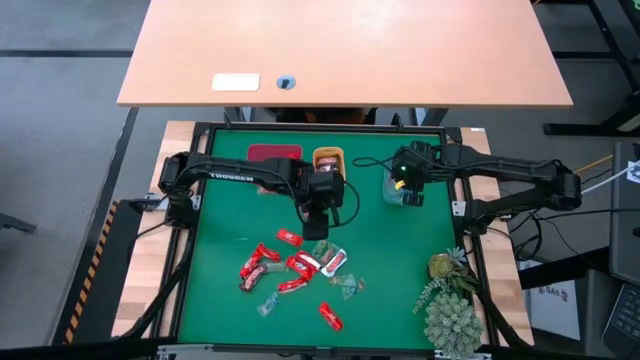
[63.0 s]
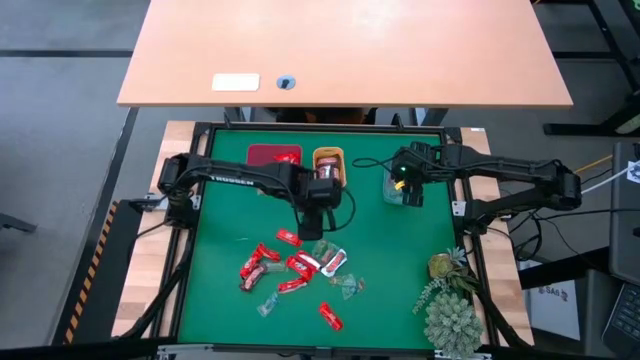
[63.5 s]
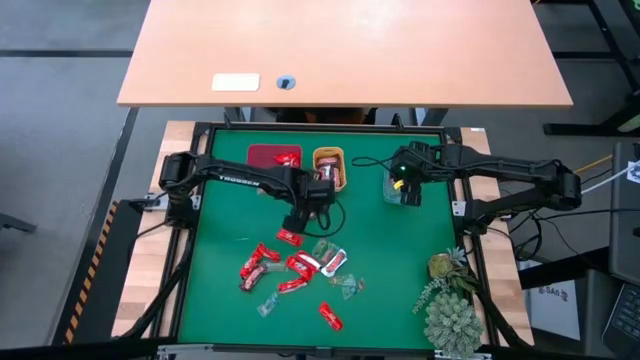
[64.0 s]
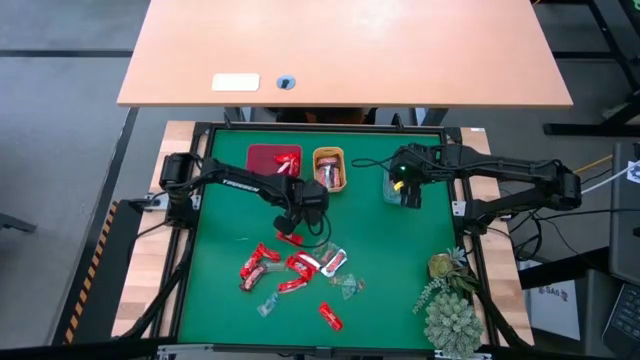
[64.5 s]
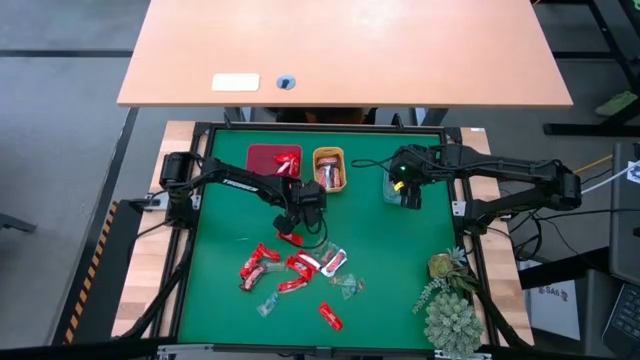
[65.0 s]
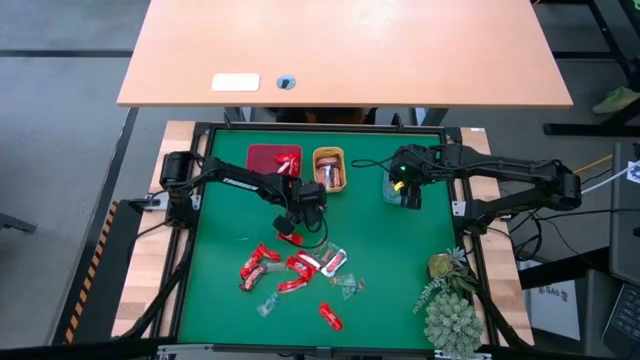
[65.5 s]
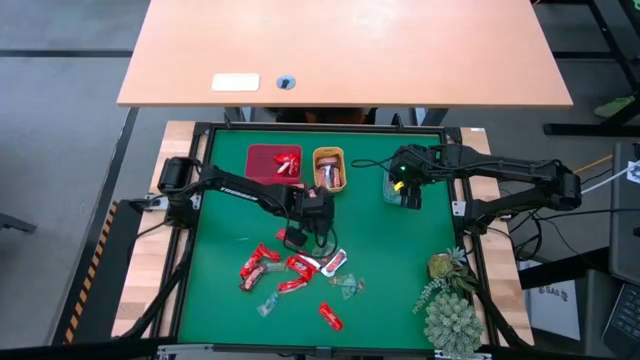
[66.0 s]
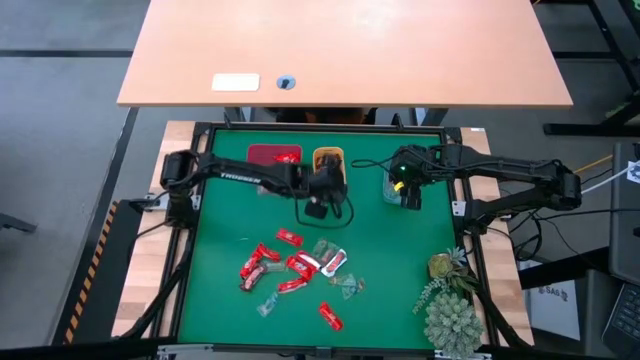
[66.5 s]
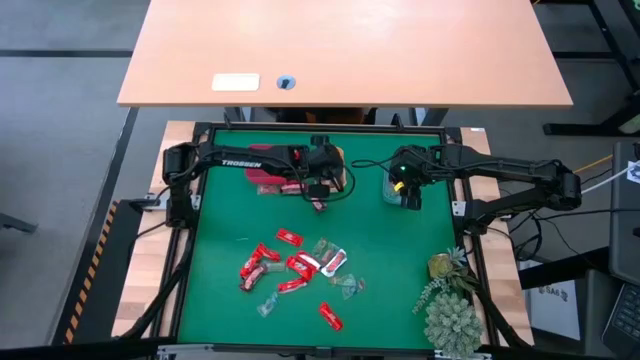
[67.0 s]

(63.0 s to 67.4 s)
Task: Sort candy
Put the brown chocolate bar into the yellow bin

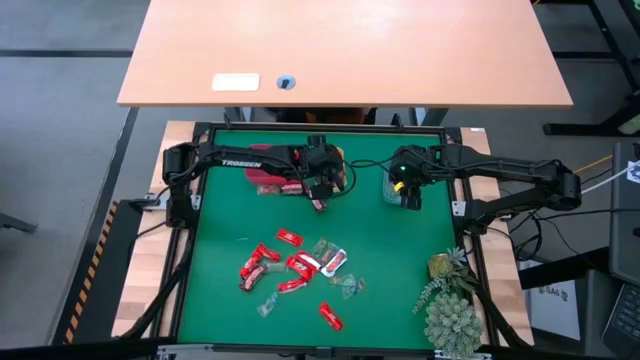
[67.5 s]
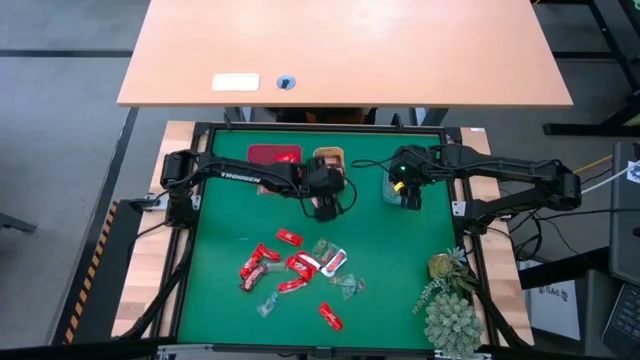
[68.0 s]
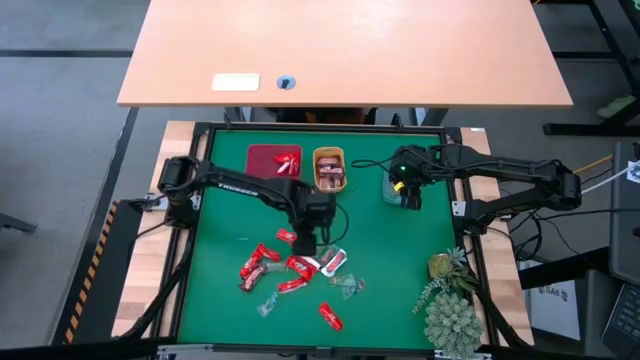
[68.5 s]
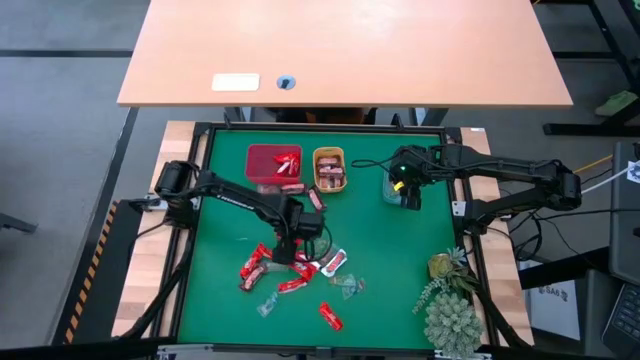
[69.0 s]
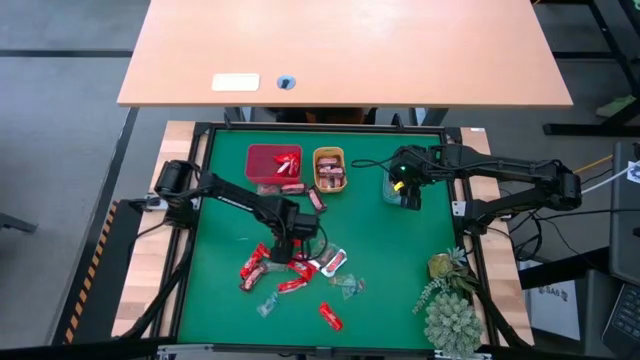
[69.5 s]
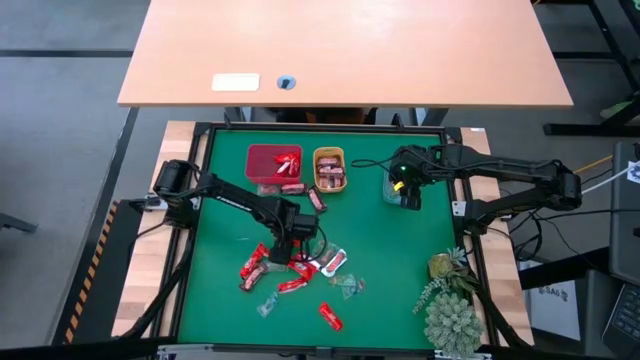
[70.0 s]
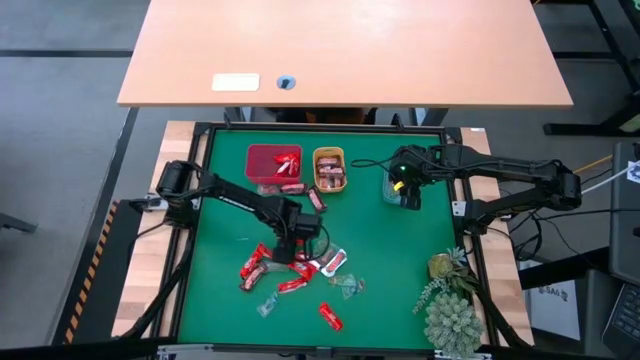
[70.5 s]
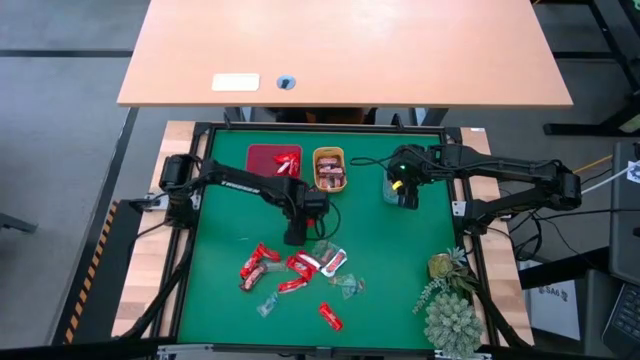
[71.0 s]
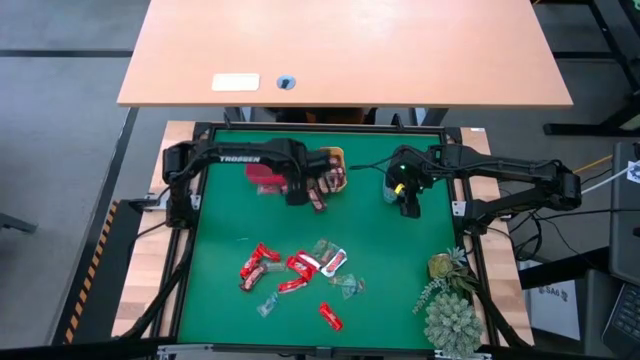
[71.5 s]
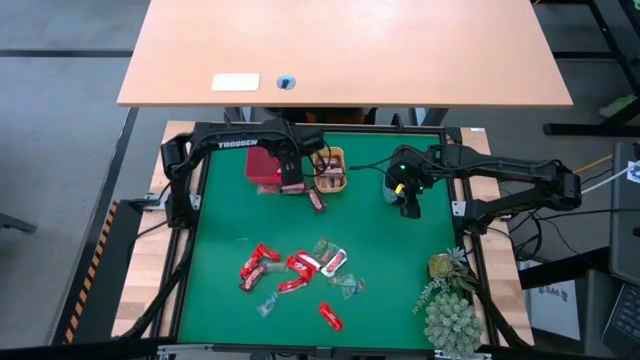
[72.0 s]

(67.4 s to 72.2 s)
Put the red chocolate bar into the red bin

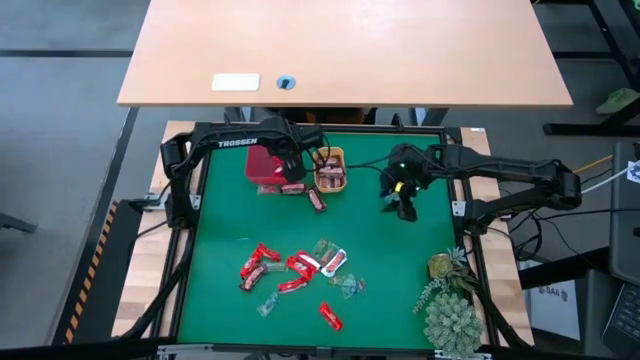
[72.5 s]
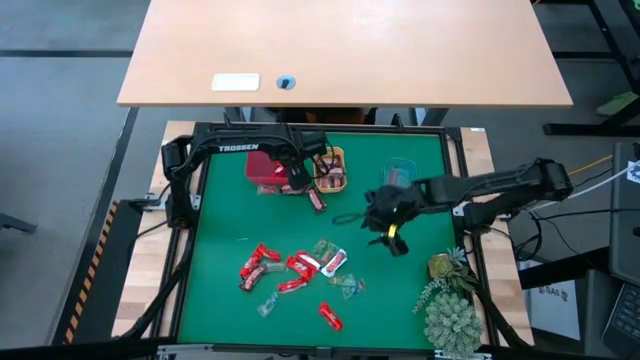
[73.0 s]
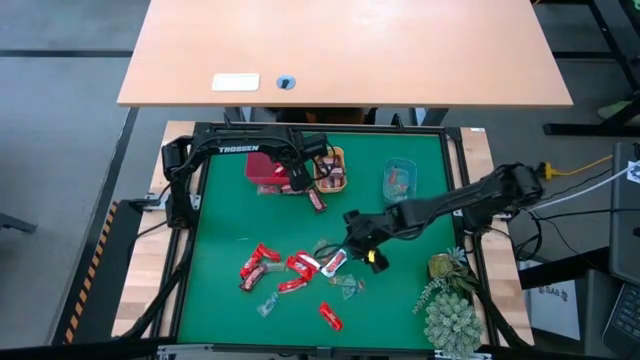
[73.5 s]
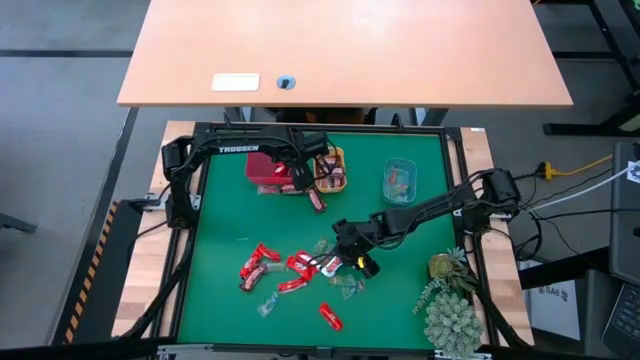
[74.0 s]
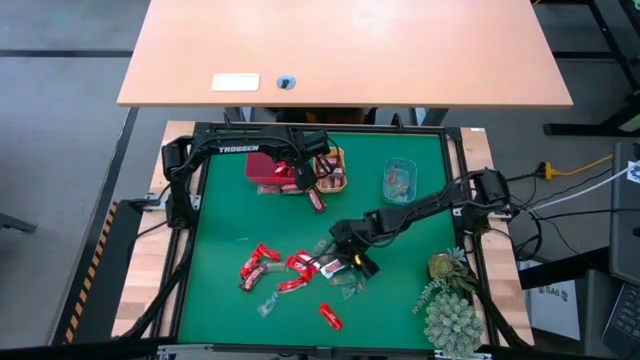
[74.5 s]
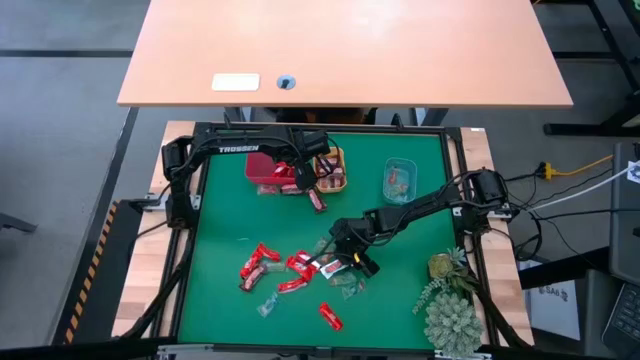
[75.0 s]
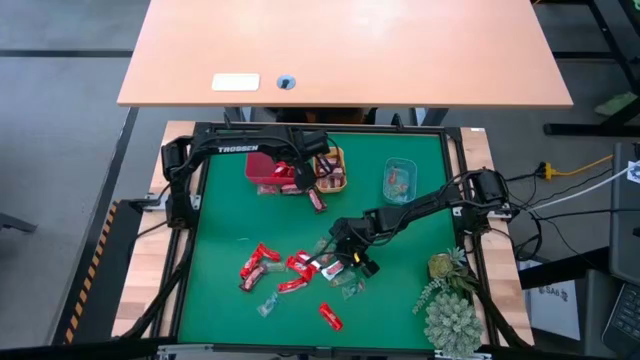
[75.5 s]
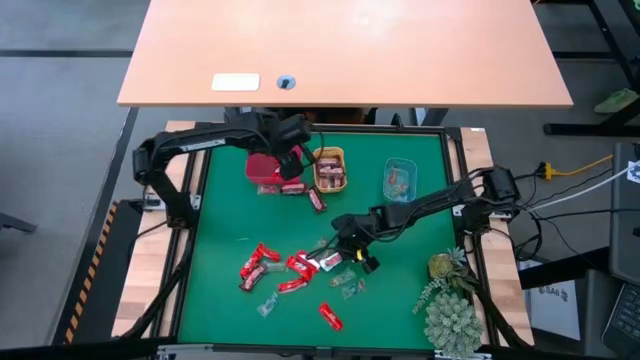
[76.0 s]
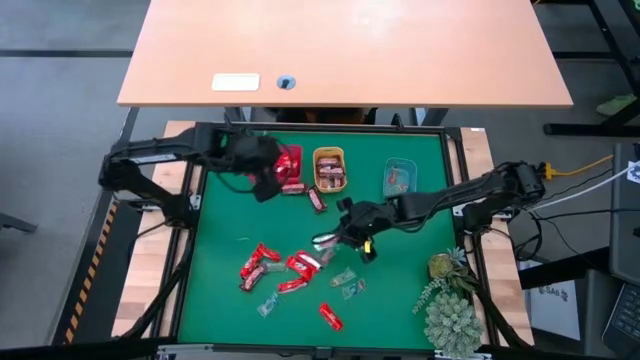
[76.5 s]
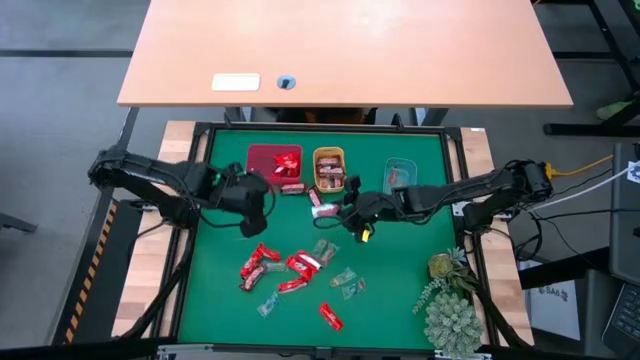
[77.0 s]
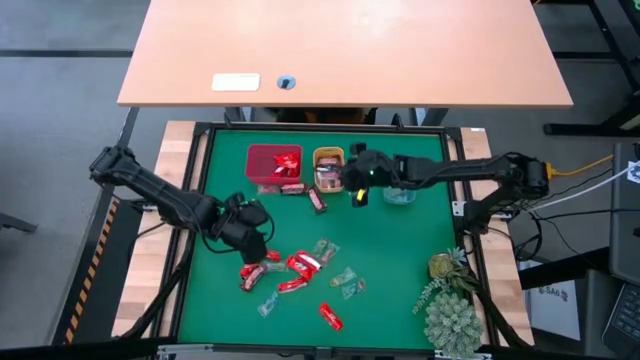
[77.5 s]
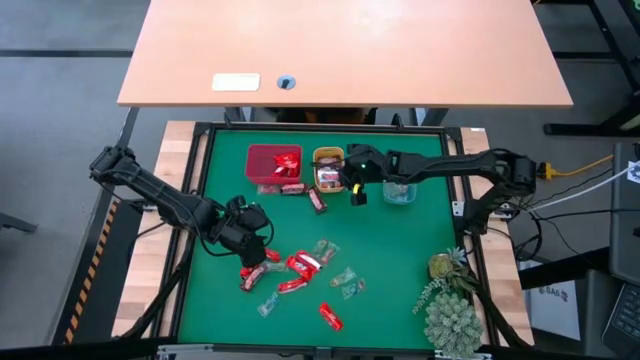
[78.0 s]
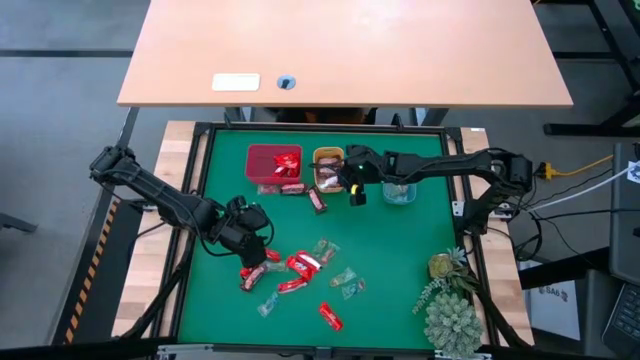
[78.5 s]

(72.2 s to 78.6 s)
Put the white chocolate bar into the yellow bin

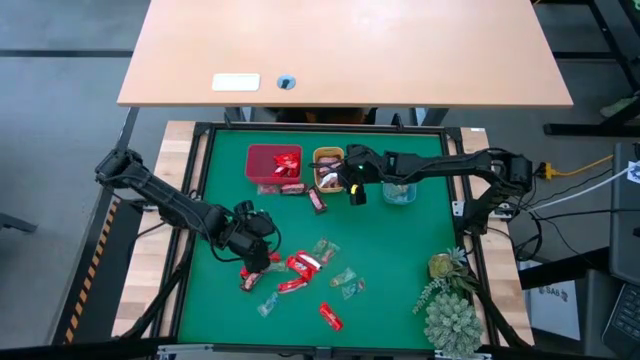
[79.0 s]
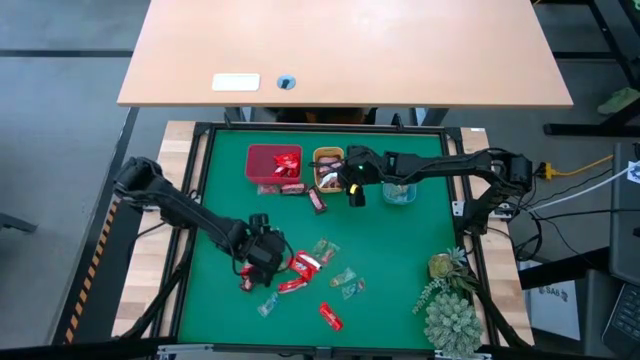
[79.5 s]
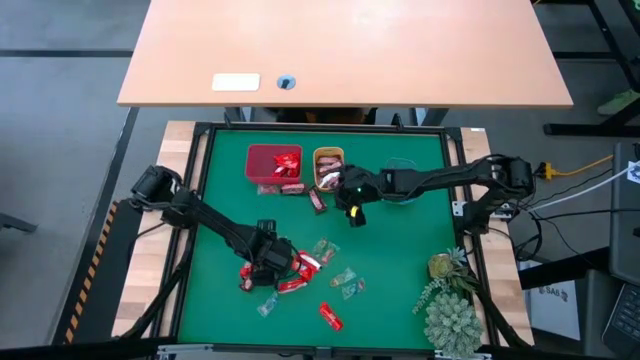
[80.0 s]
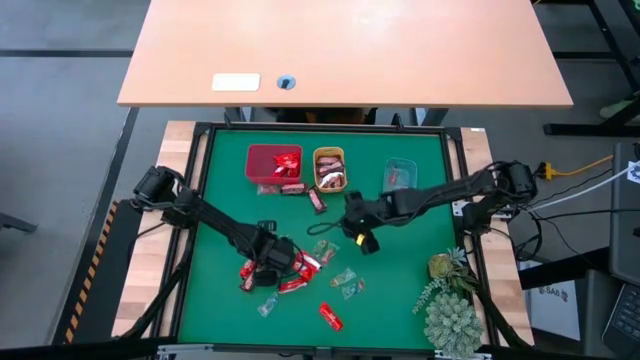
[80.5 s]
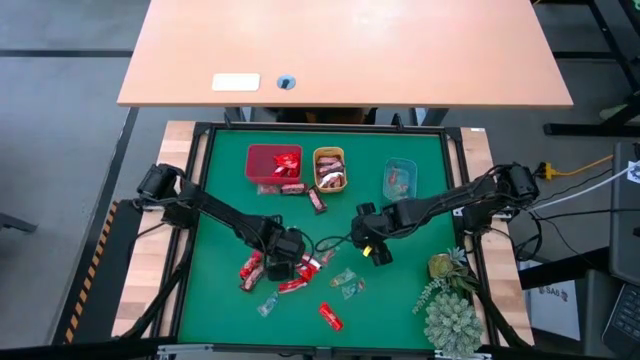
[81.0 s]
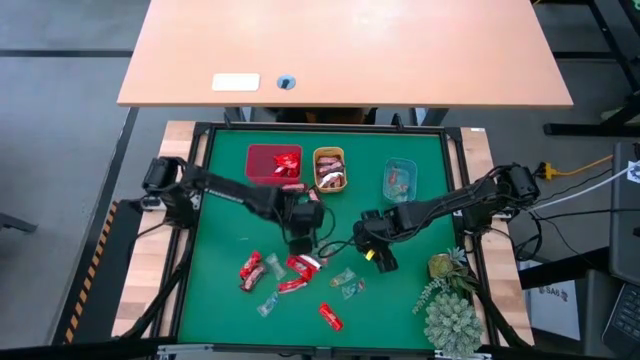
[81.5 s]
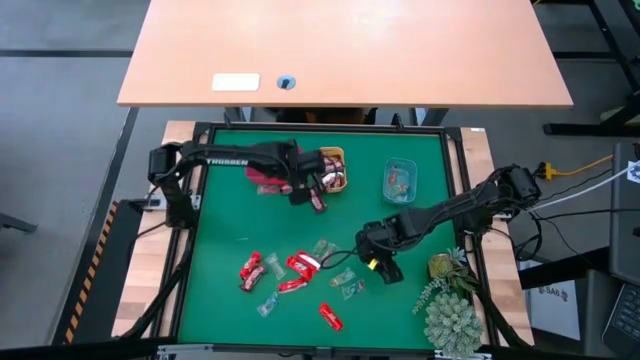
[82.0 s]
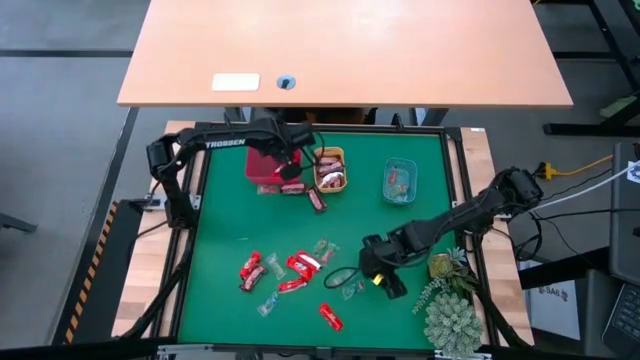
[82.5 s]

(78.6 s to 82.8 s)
Put the red chocolate bar into the red bin
